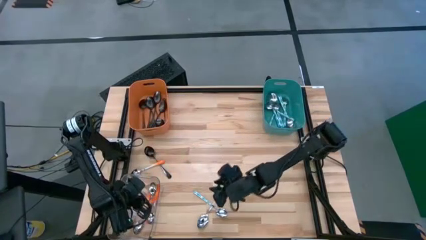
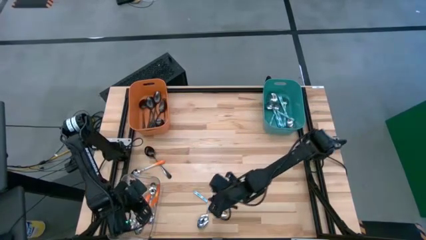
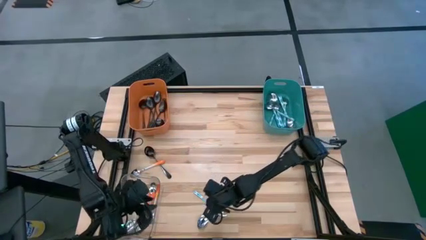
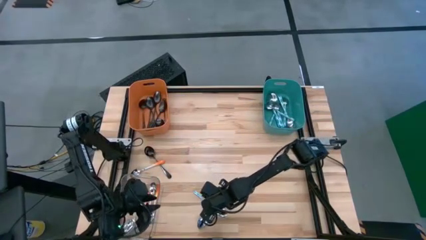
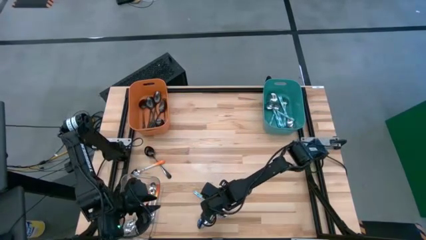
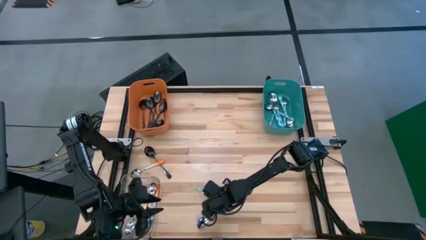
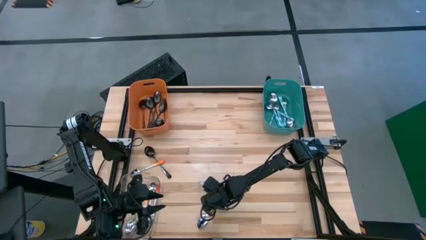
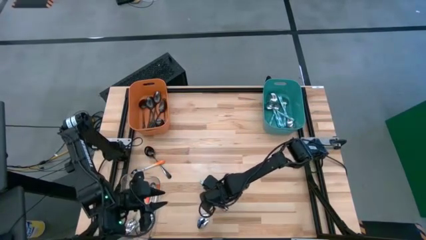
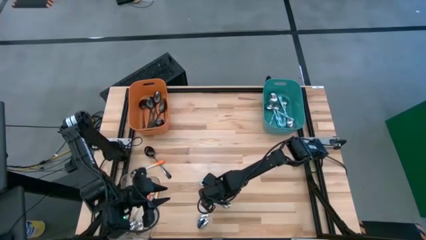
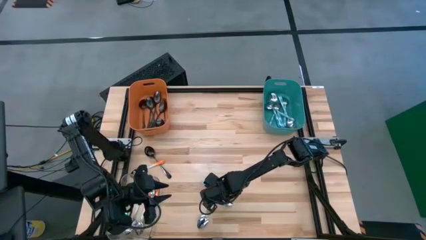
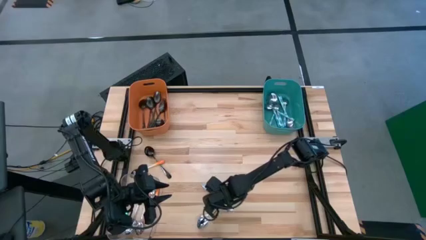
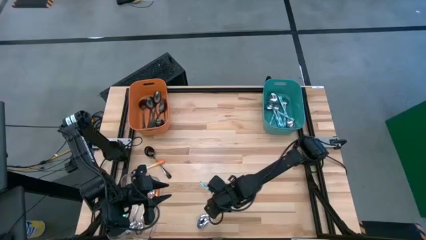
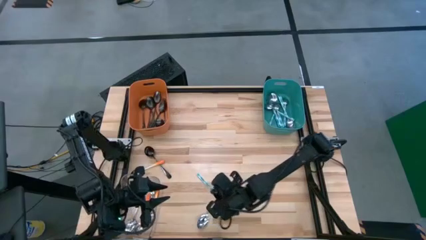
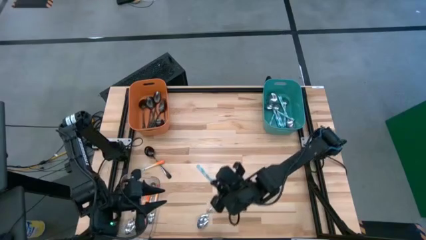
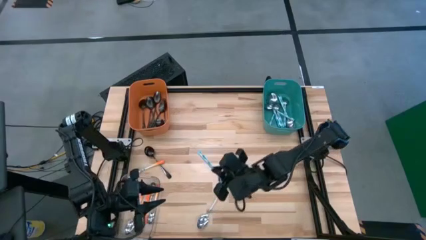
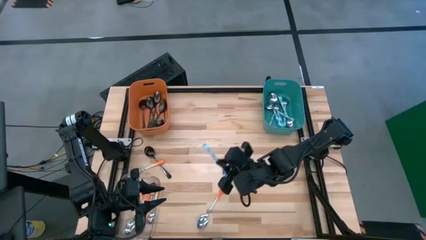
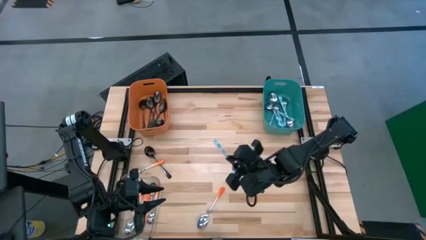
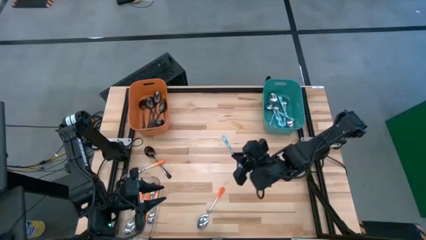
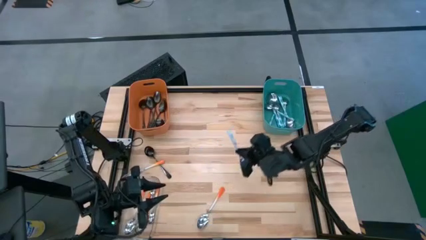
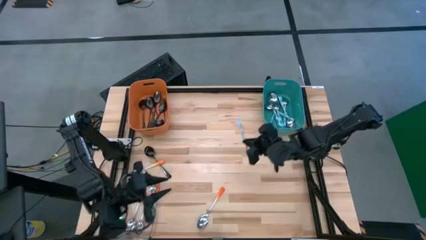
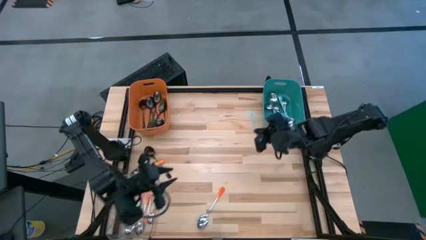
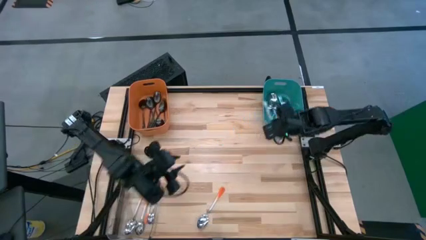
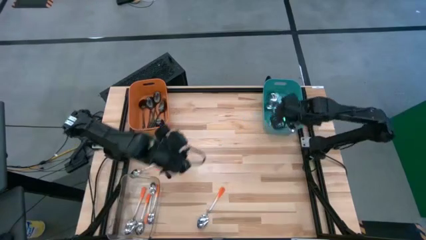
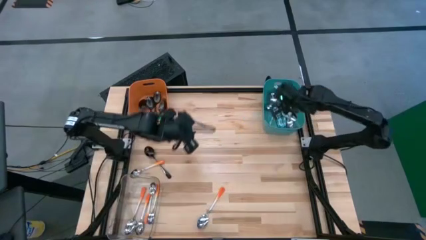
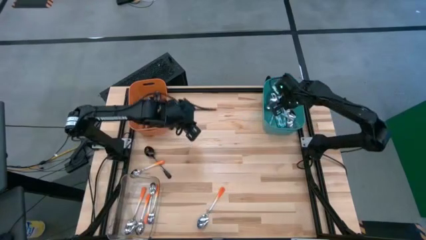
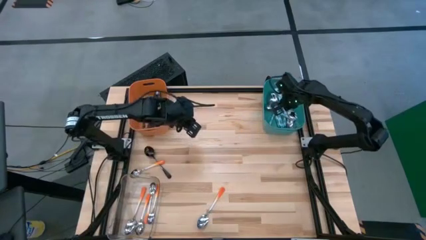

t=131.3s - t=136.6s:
Task: Sort silverware by color (type)
Put the blue patterned spoon into the blue bin

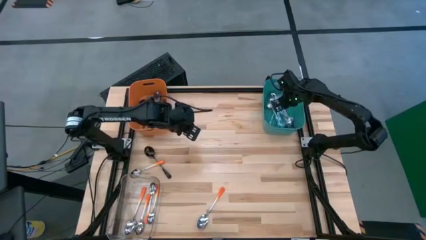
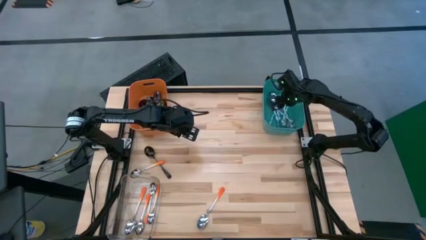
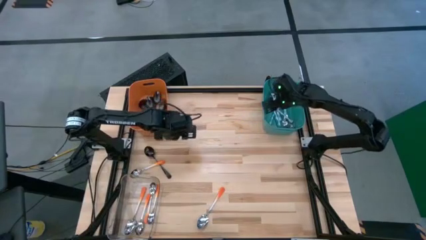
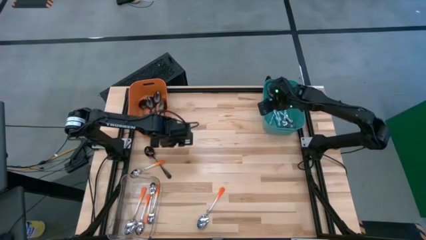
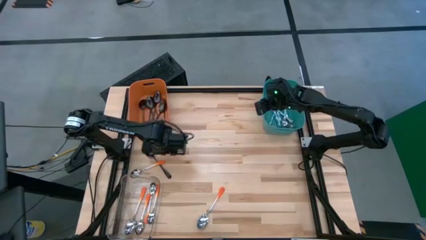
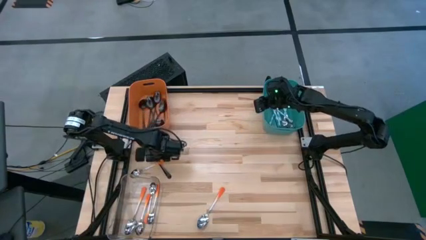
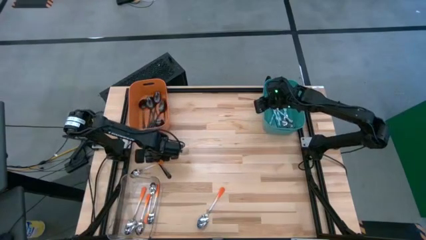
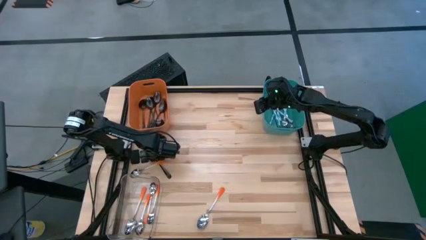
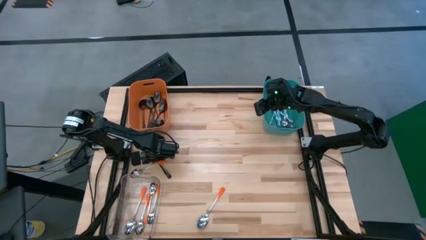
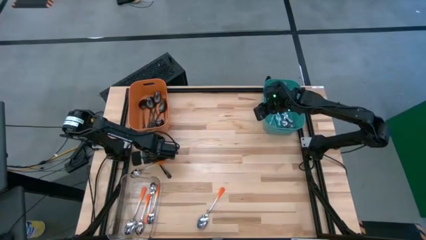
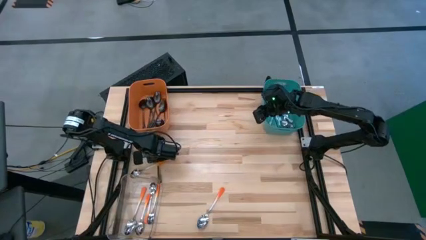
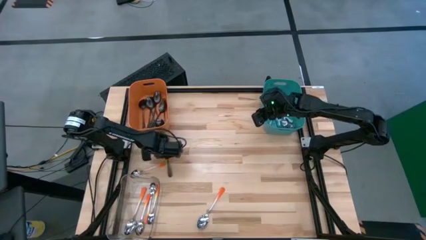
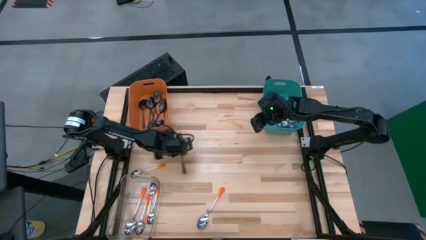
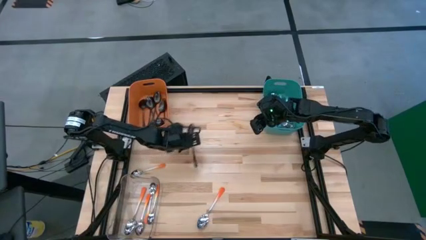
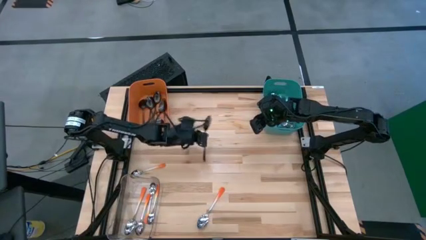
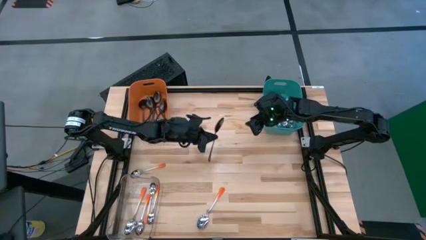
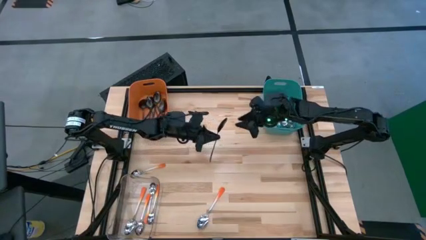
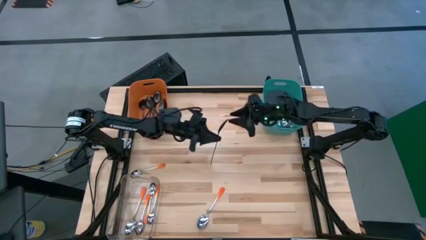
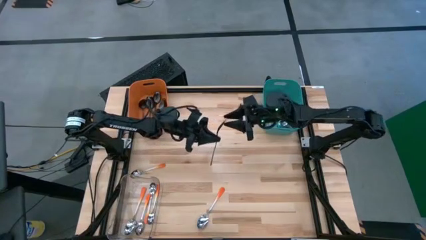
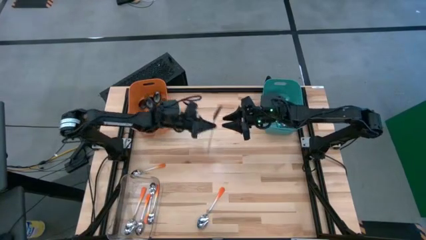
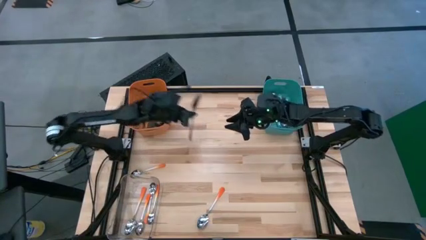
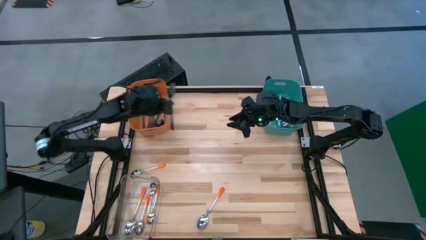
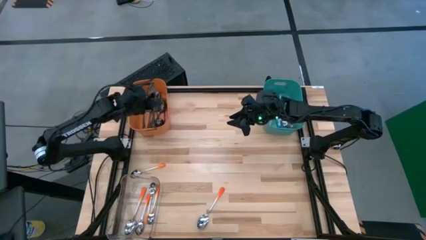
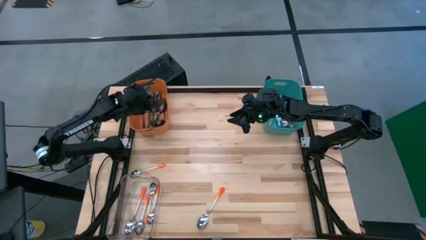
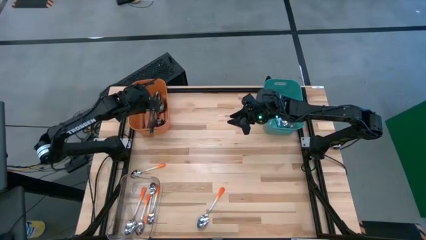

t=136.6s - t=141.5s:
Put the black spoon into the orange bin

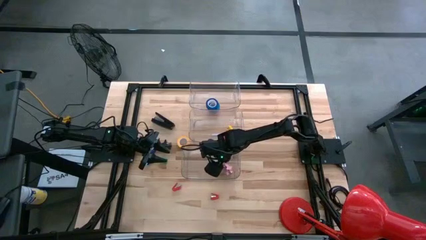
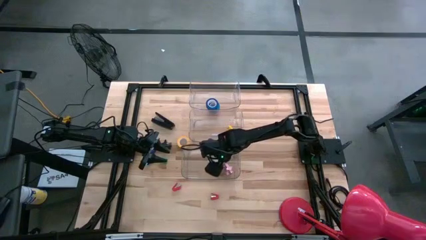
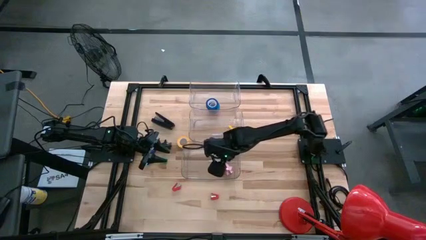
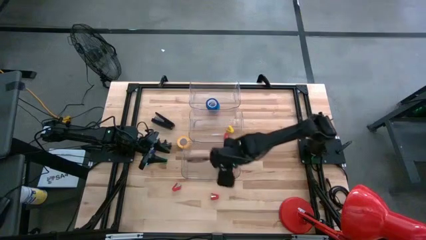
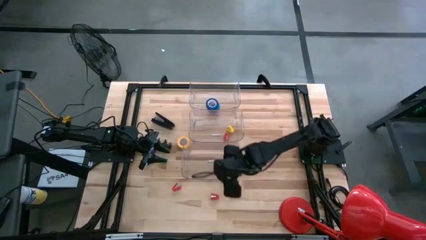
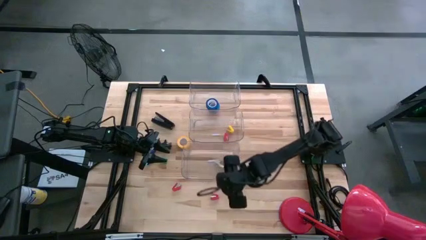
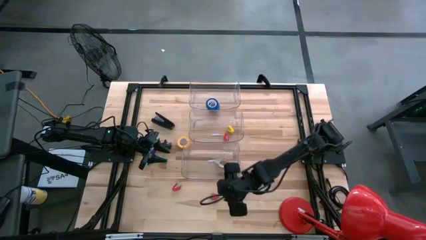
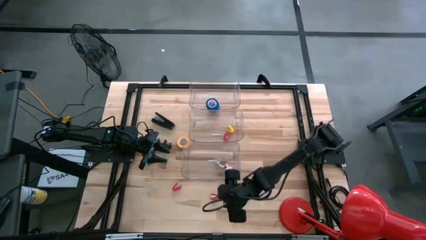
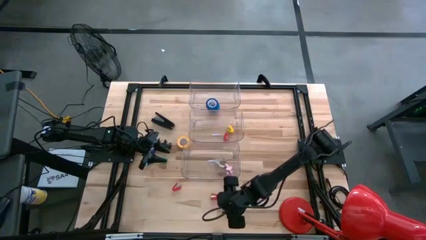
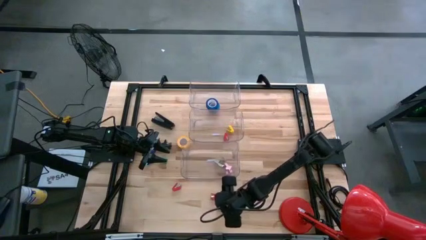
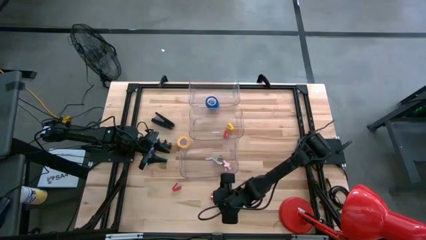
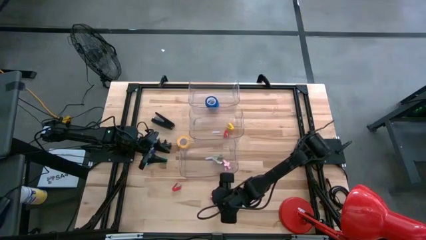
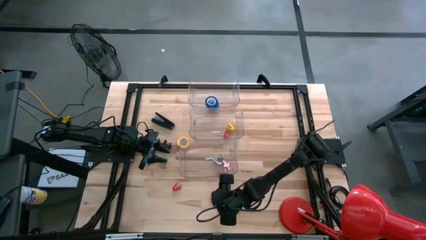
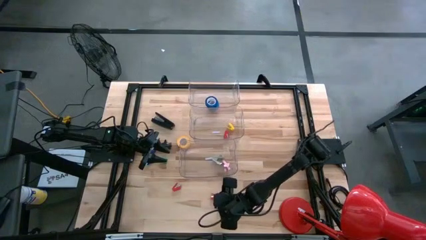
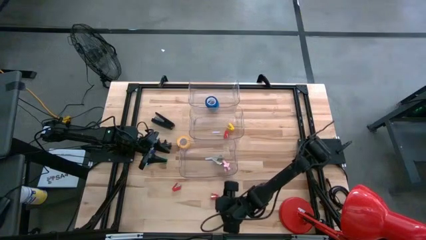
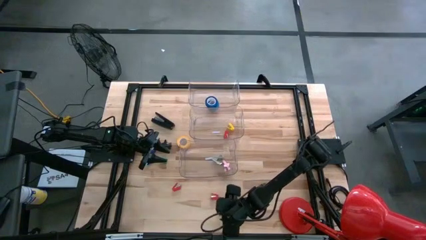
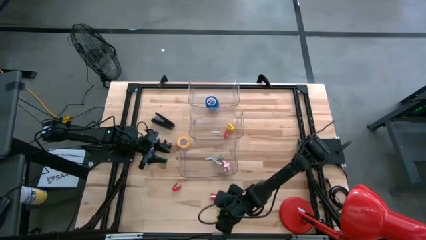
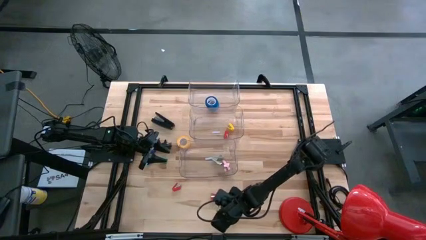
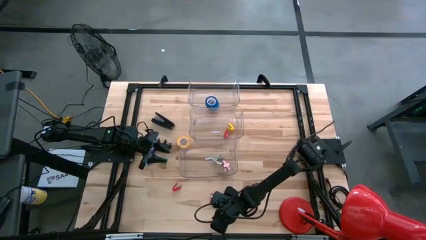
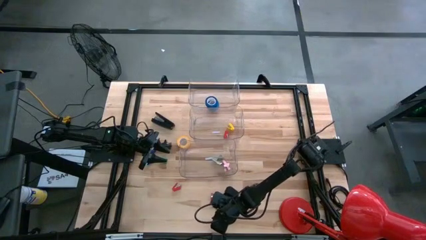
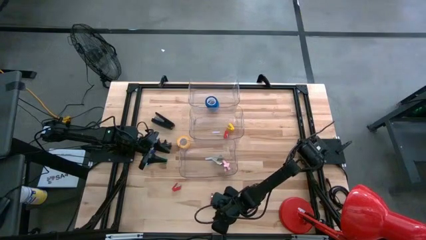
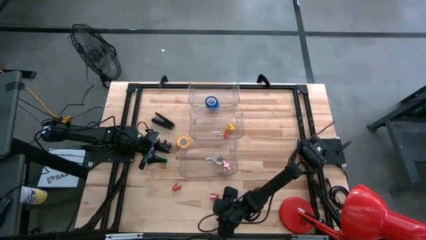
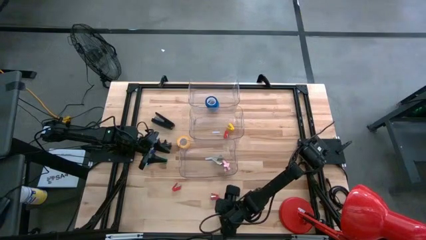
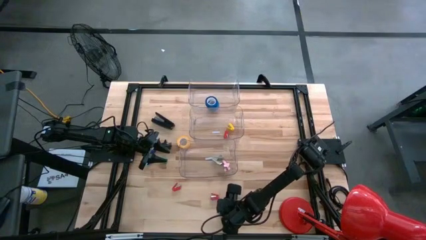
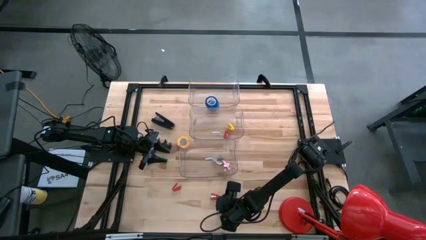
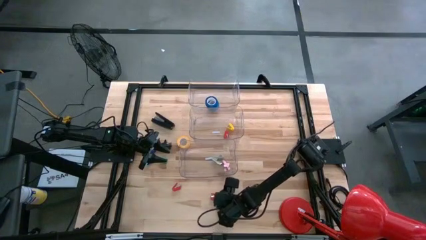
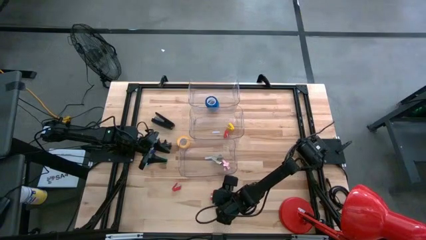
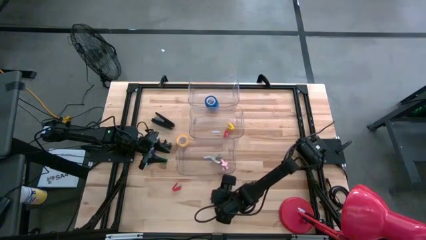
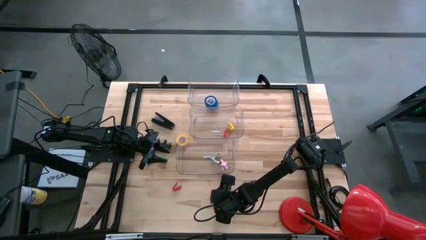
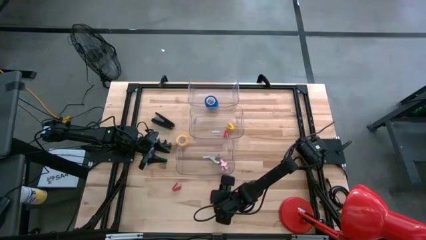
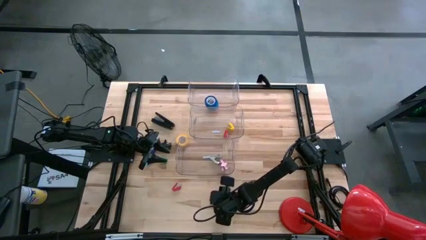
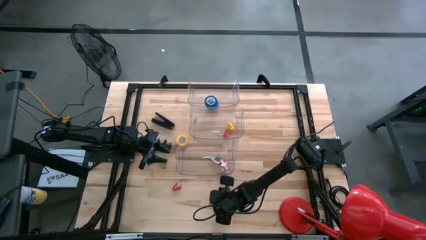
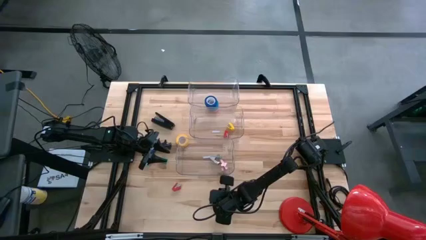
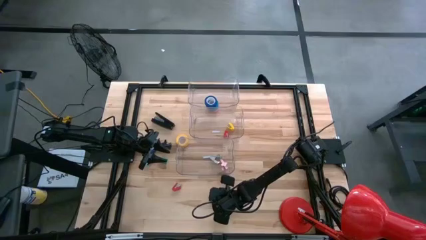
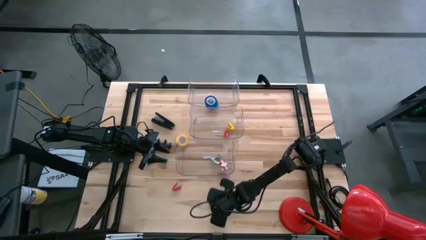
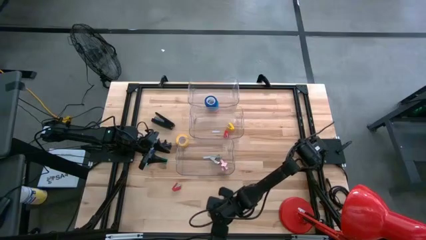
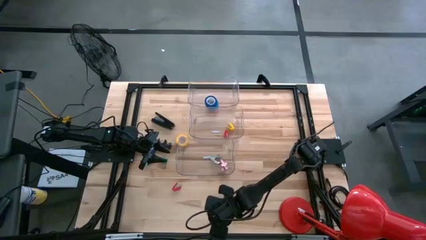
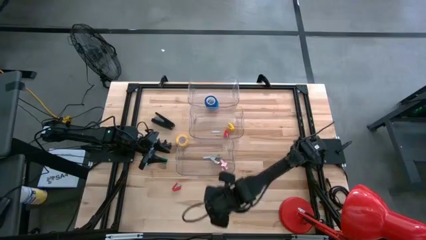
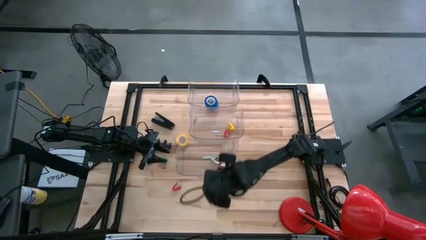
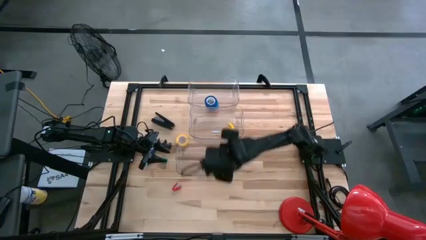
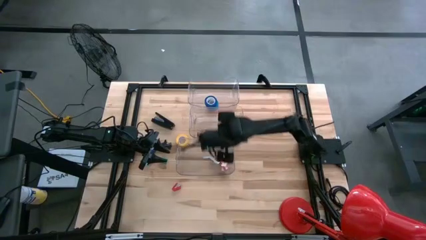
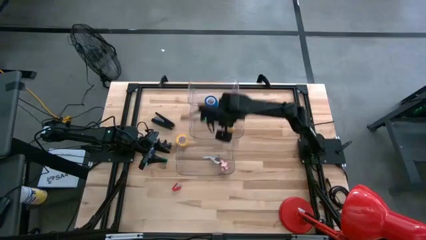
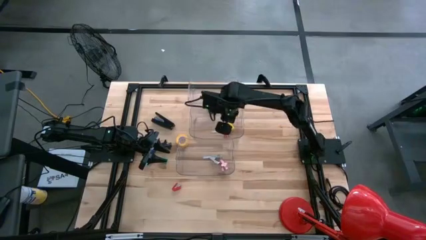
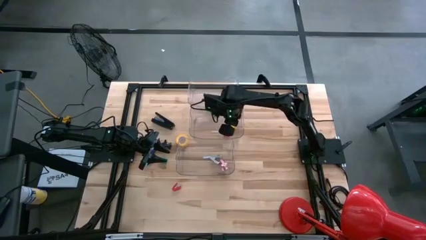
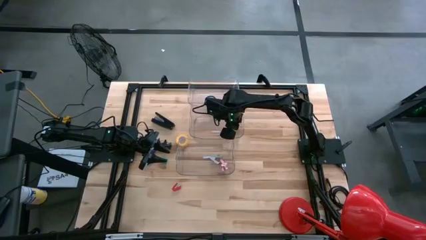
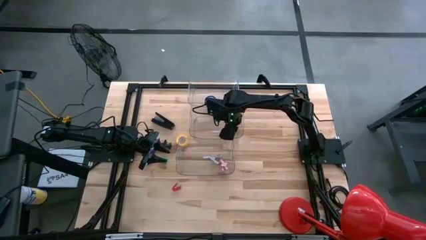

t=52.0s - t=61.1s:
Task: Pick and place Stapler, Stapler remover, tape
Put the right red stapler into the middle transparent bin
